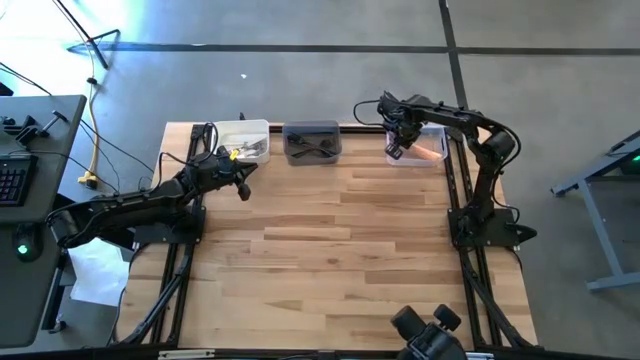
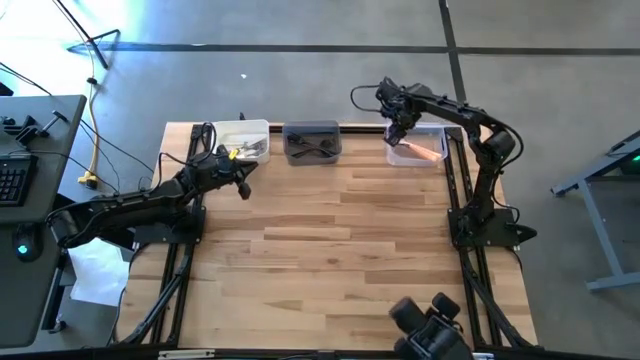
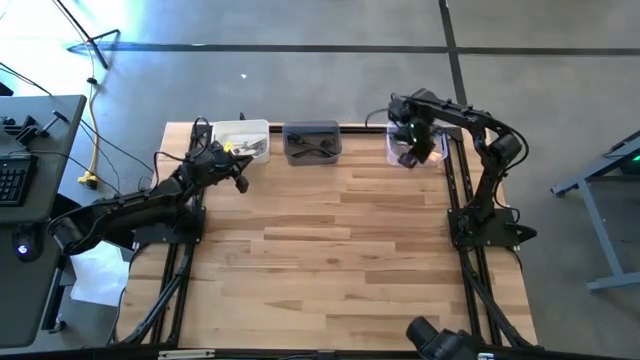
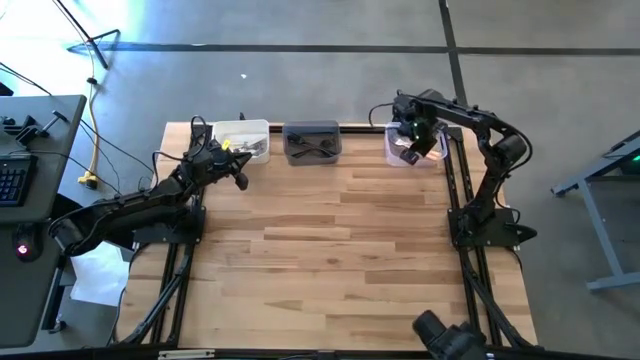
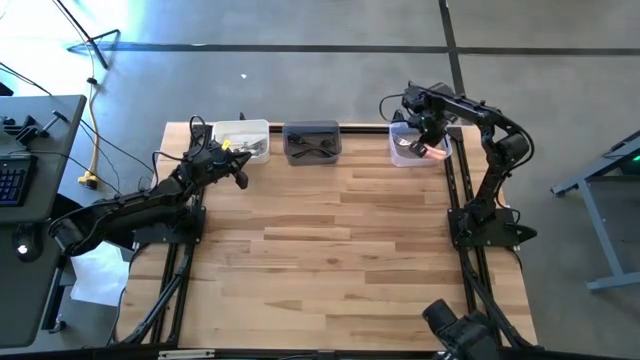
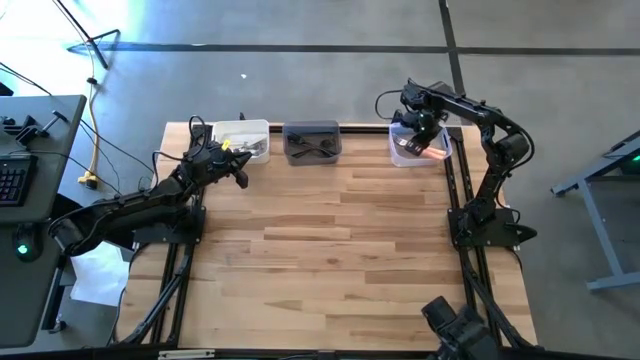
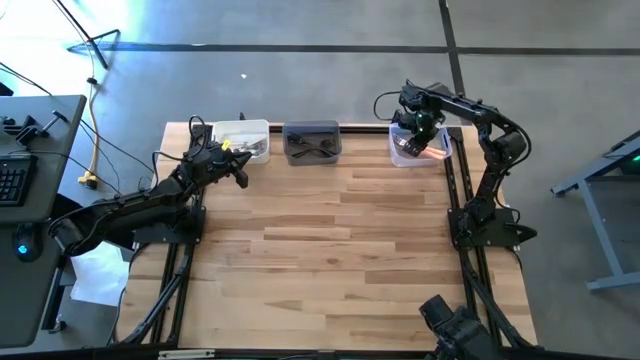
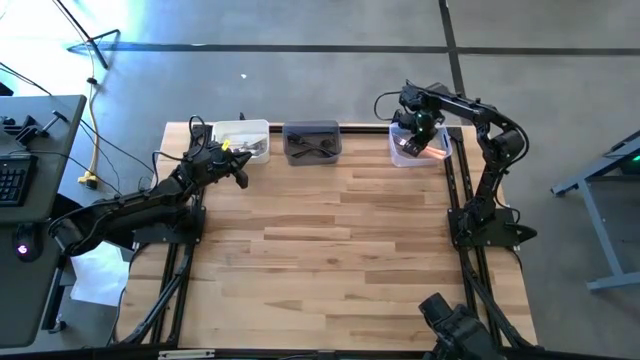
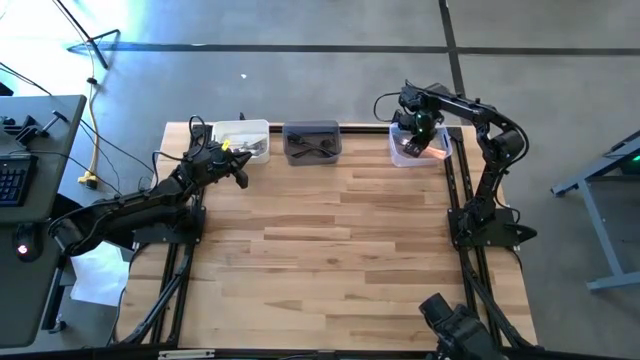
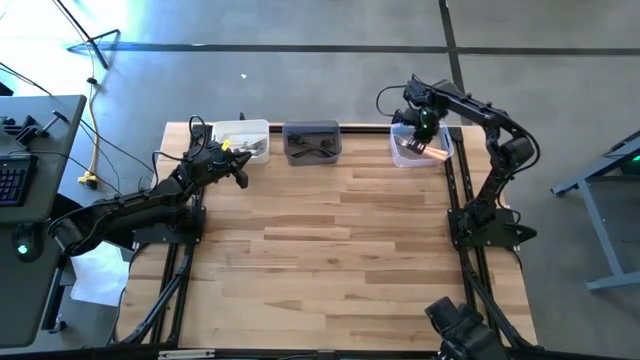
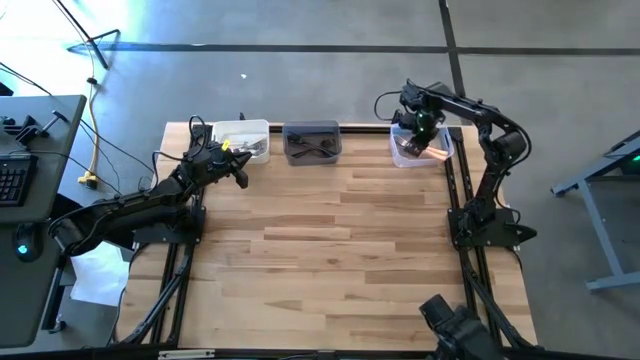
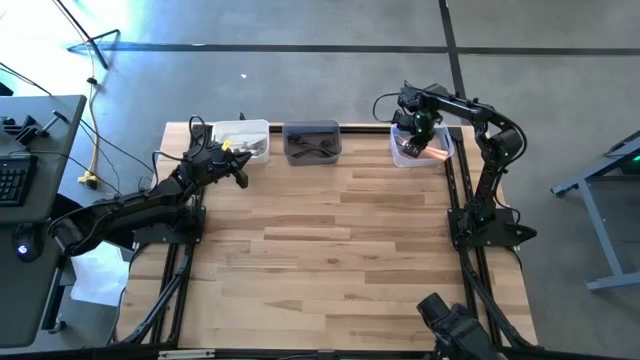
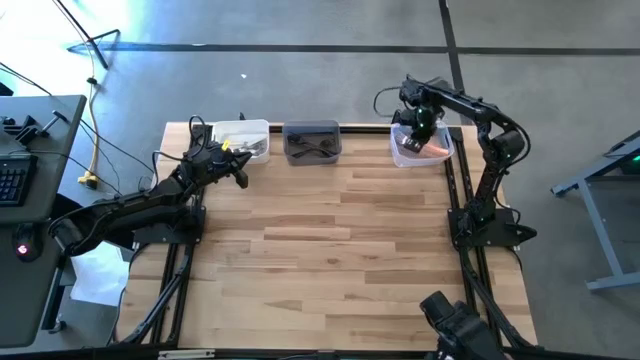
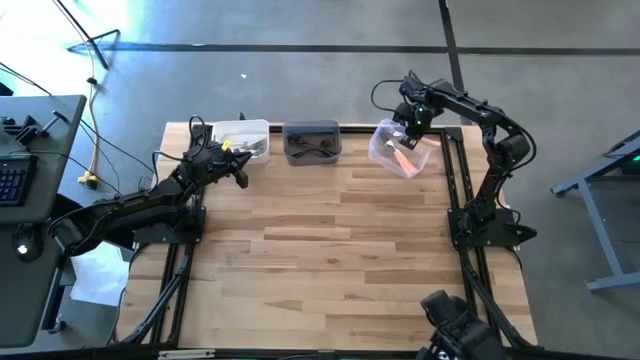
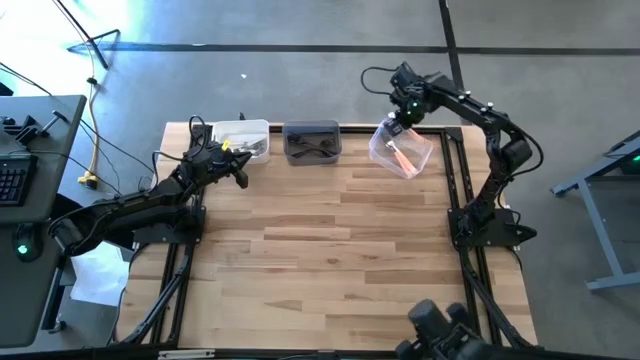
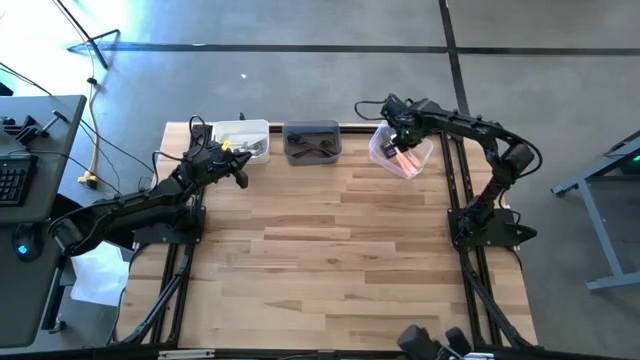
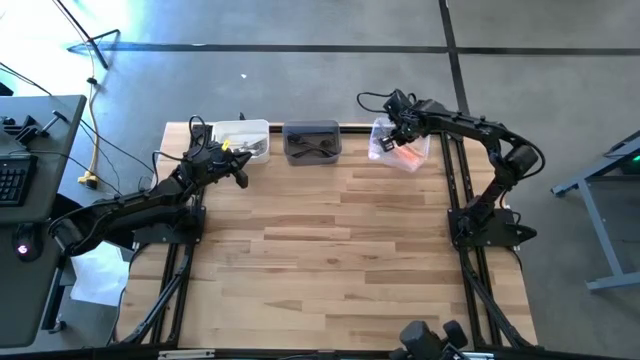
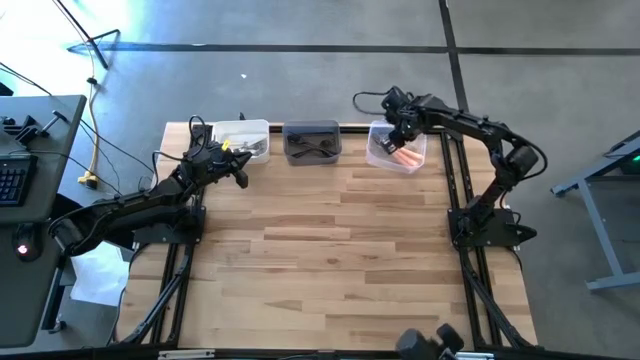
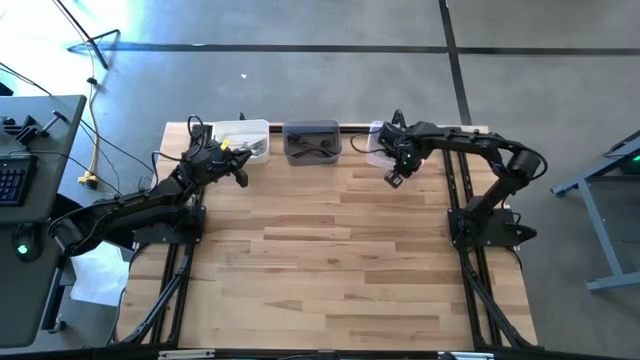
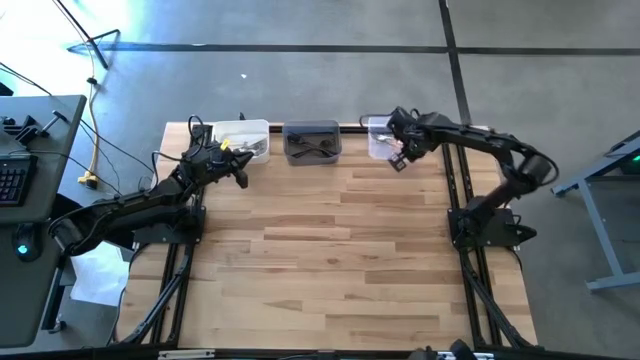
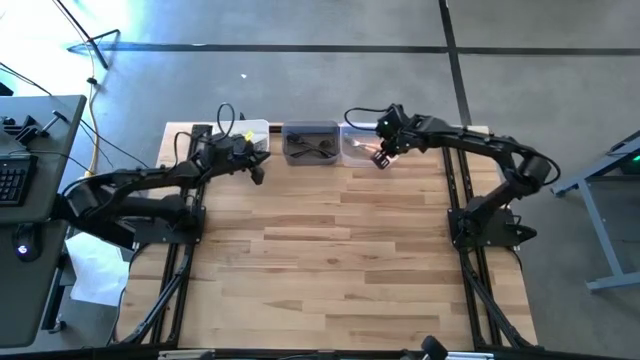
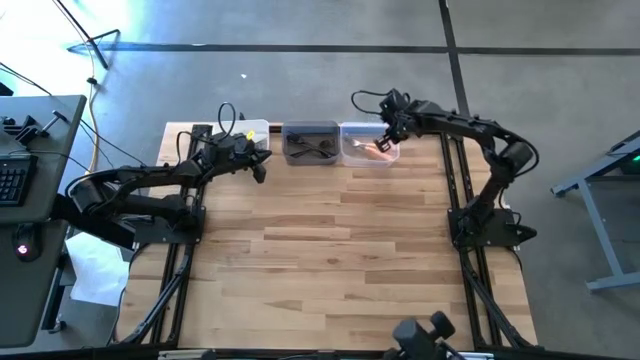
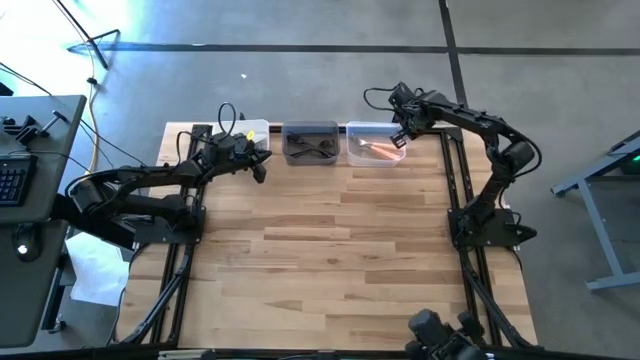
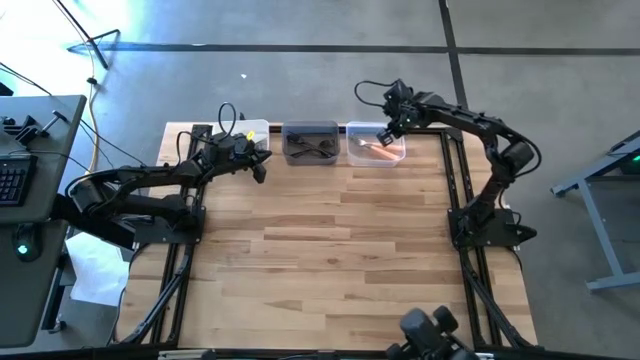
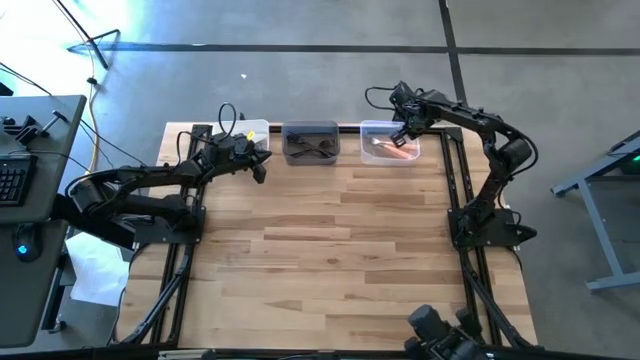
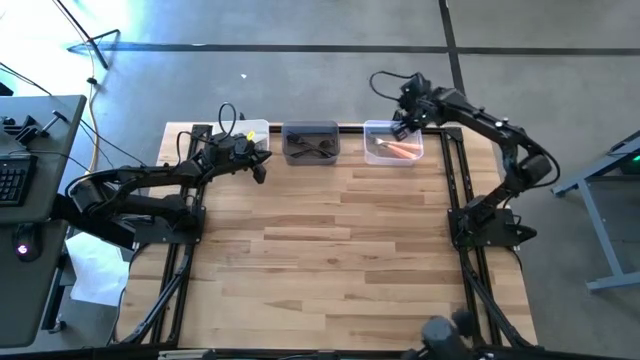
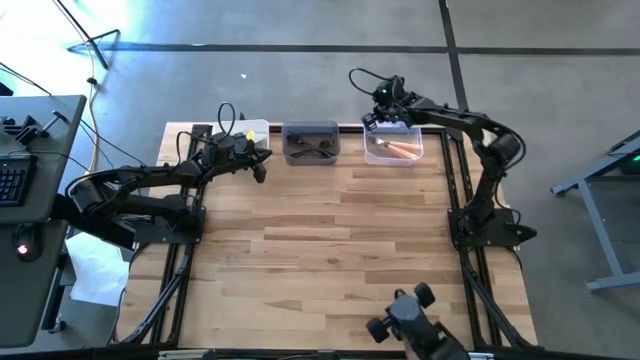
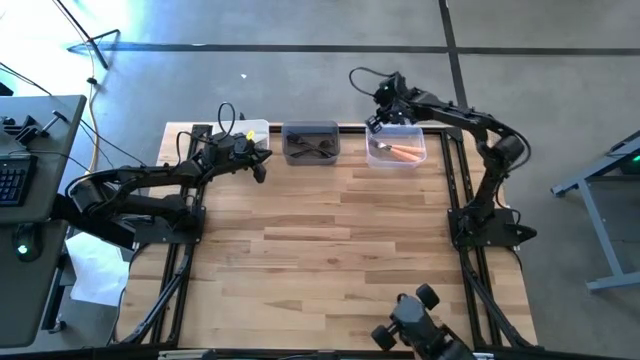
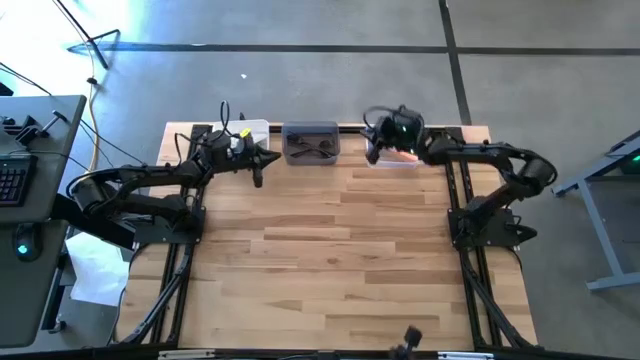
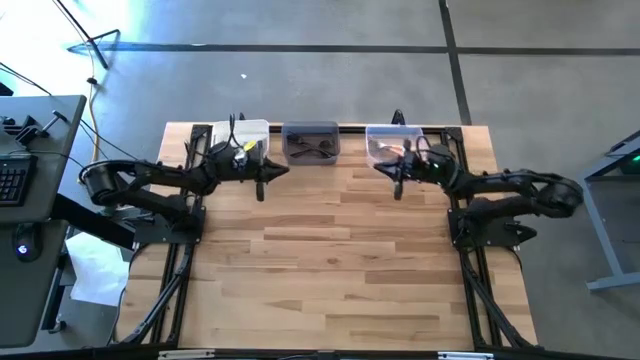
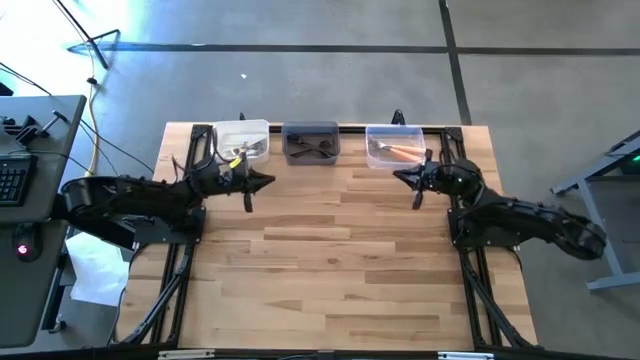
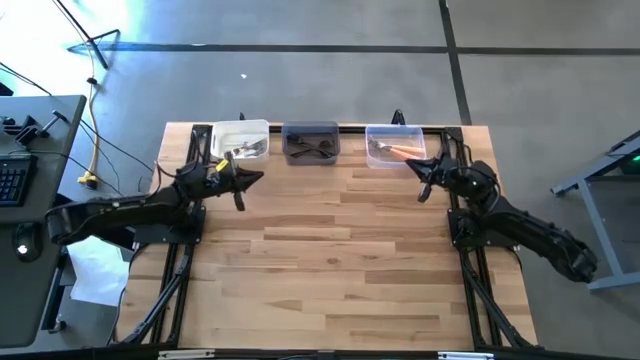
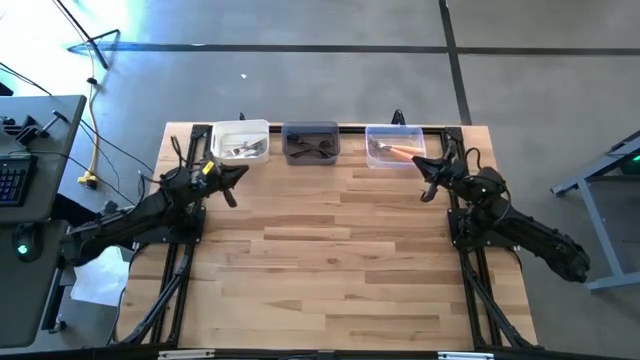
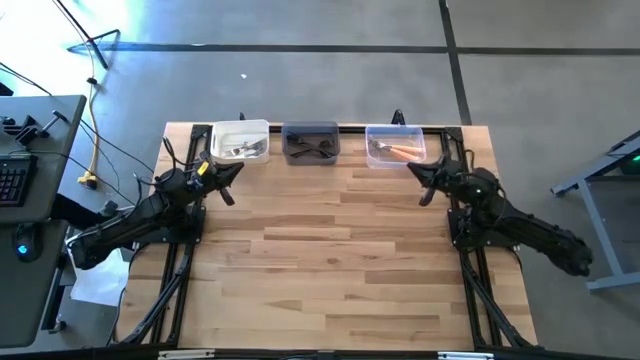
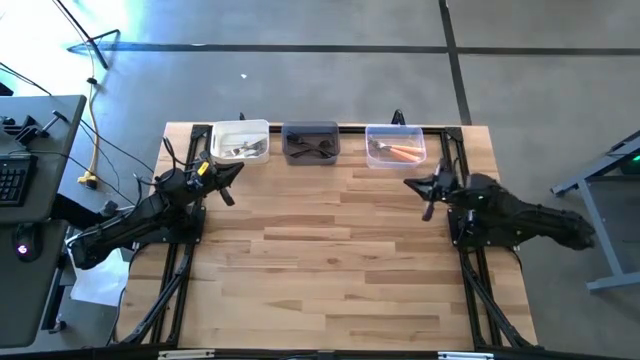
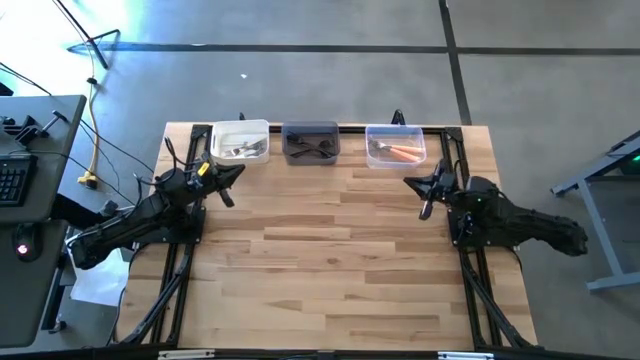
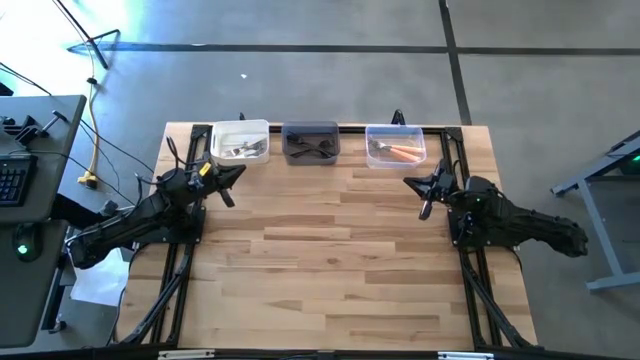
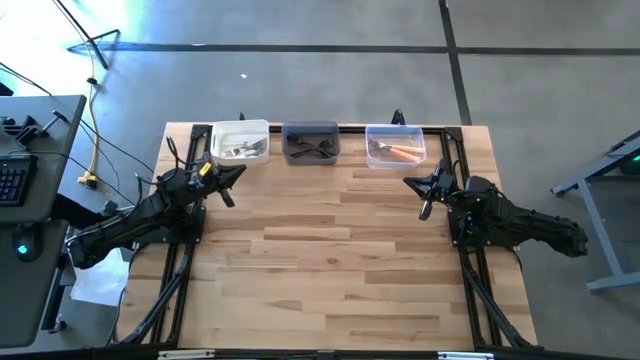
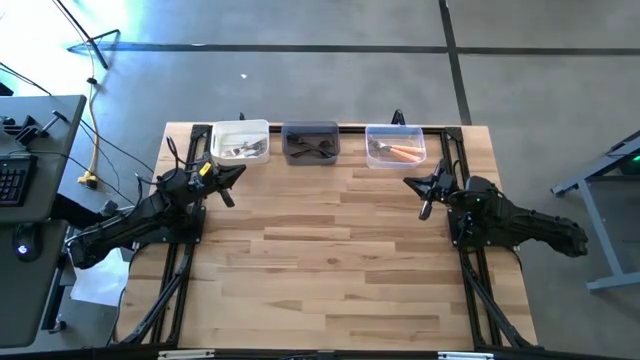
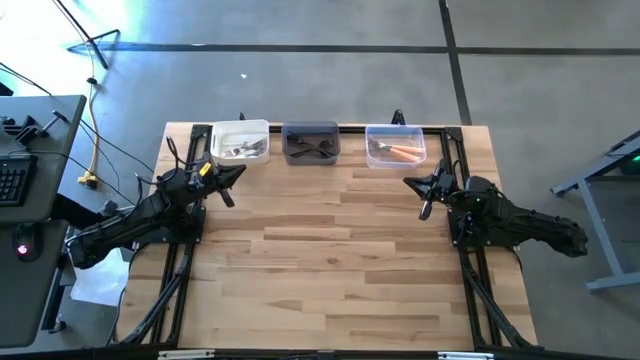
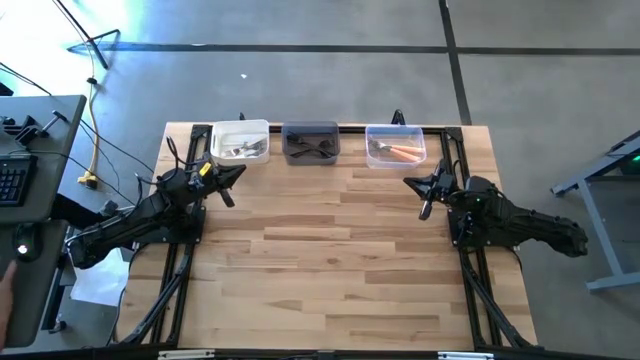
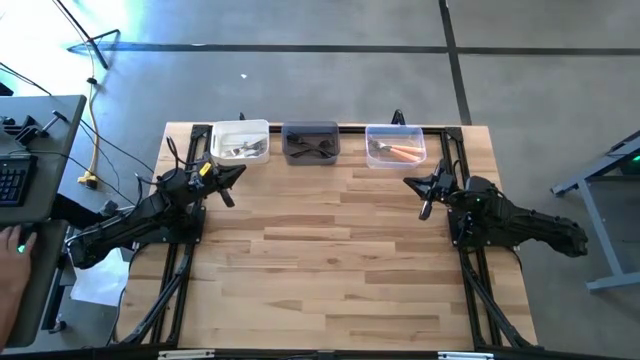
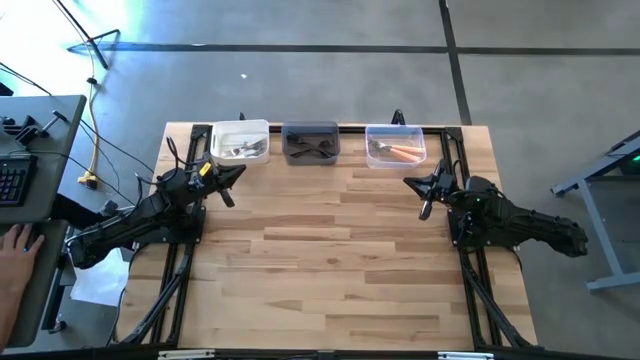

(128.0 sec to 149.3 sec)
Task: Sort silverware by color (type)
Return to Home Position
